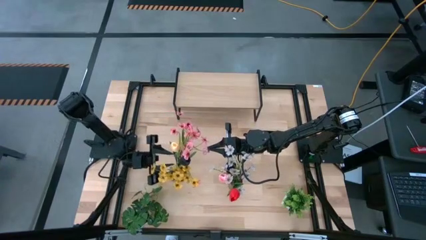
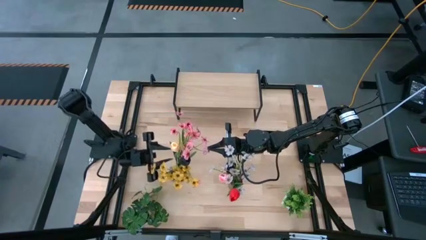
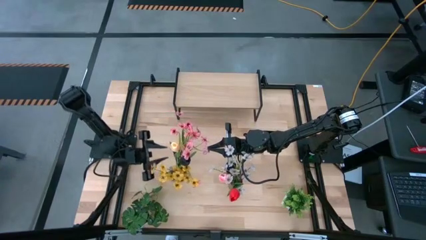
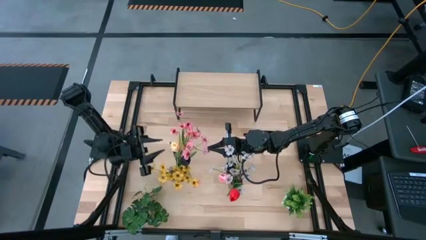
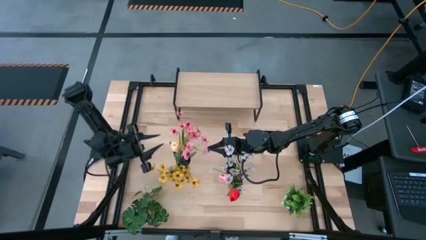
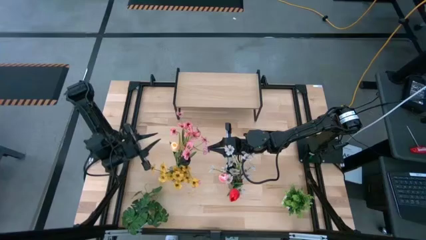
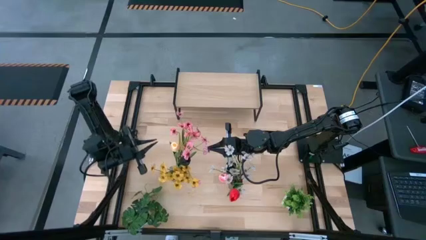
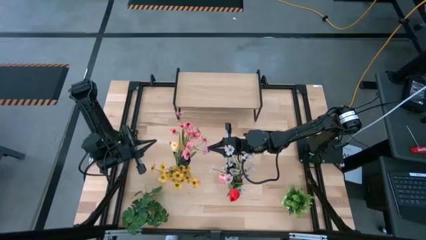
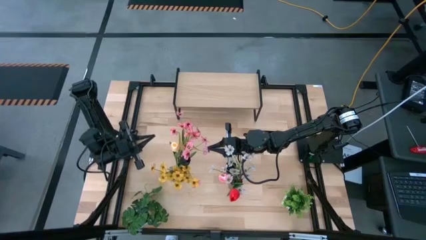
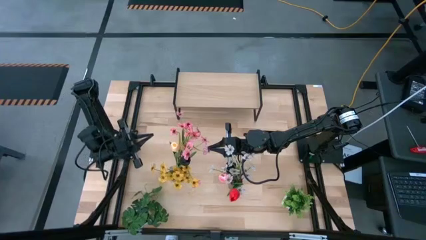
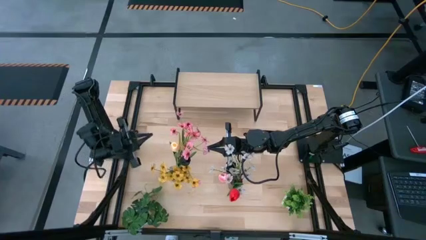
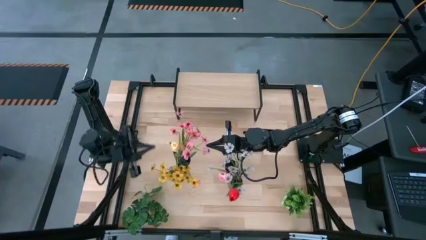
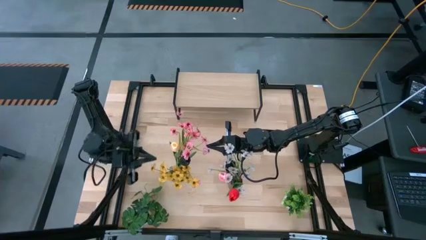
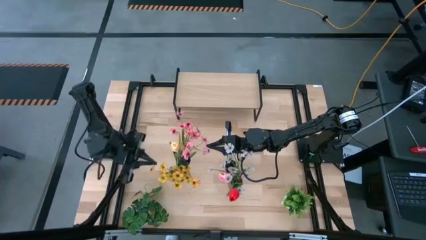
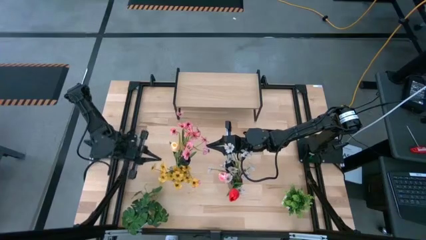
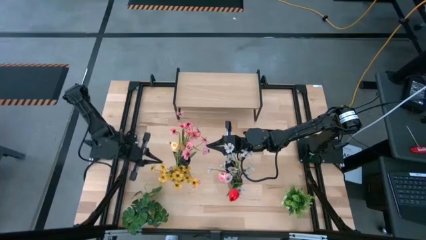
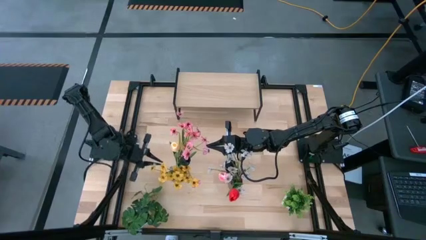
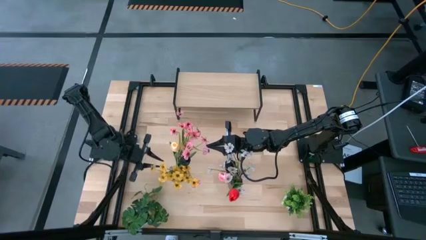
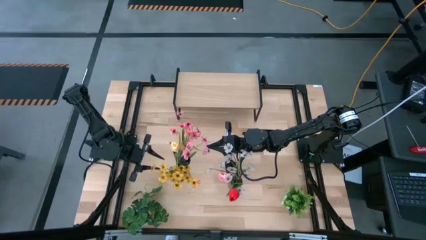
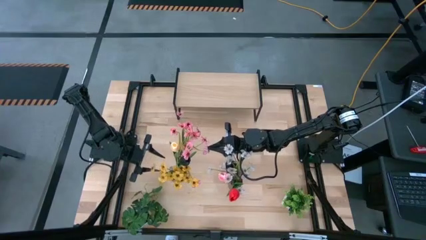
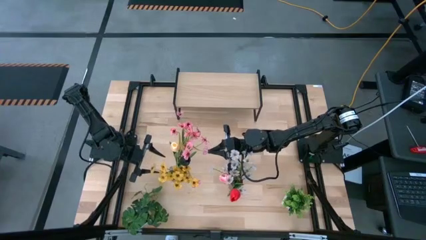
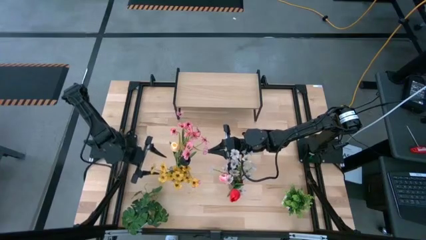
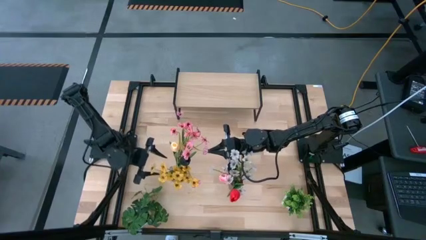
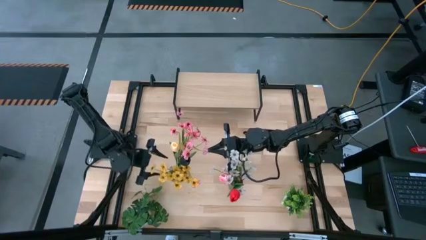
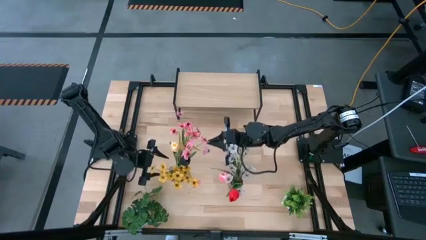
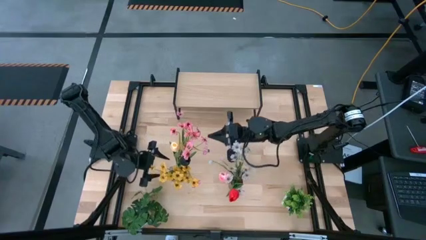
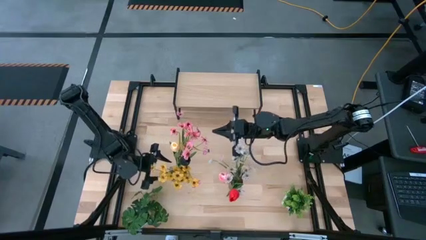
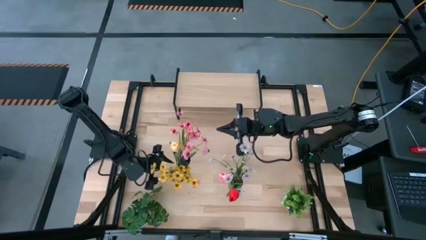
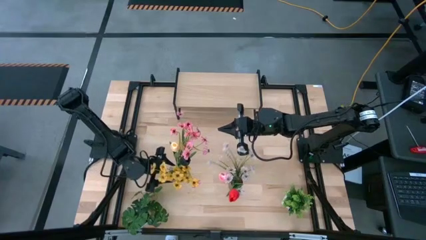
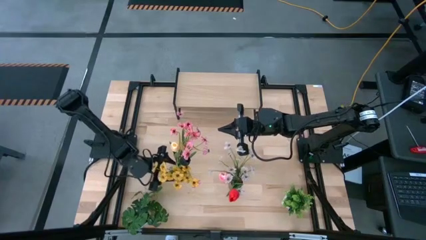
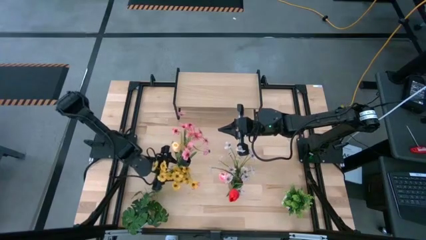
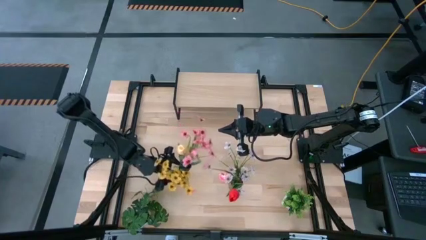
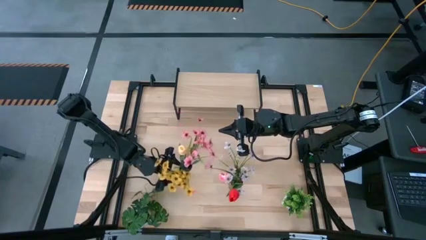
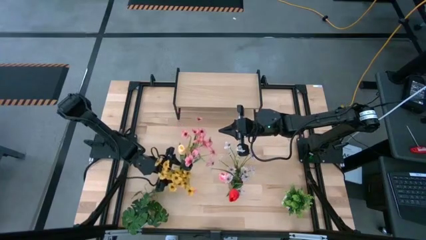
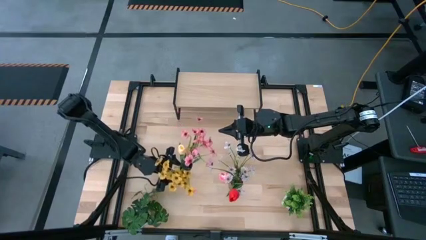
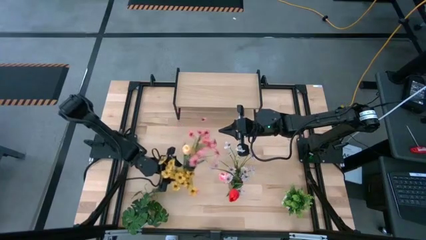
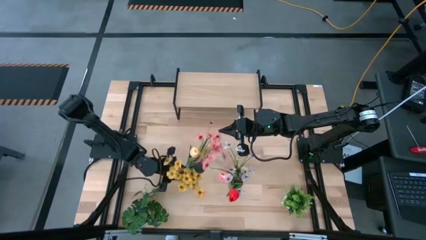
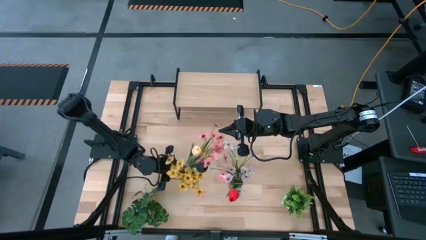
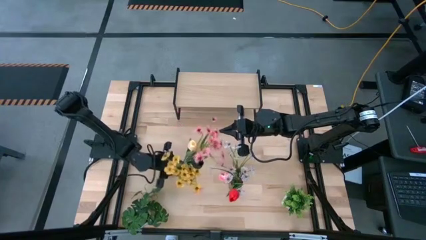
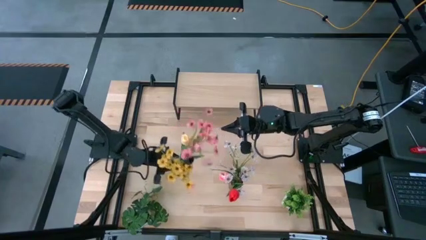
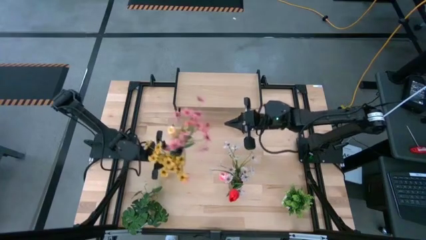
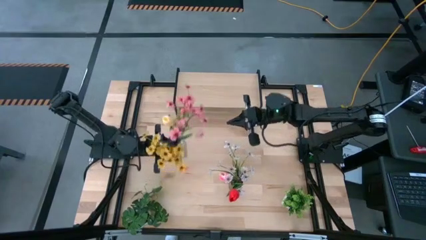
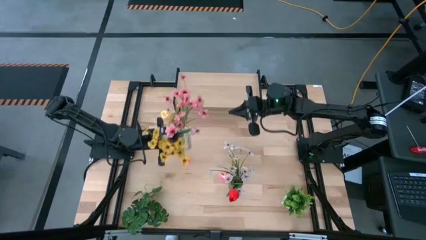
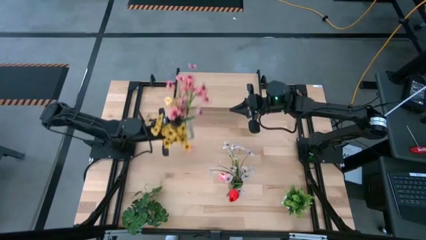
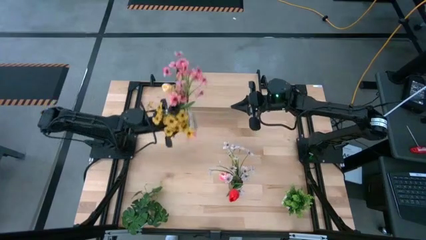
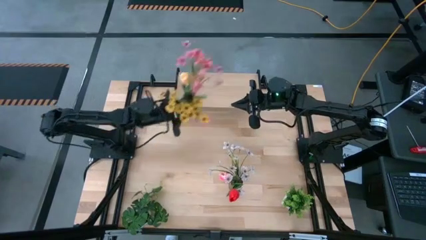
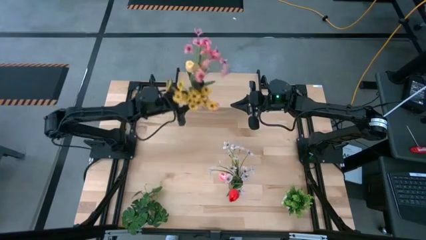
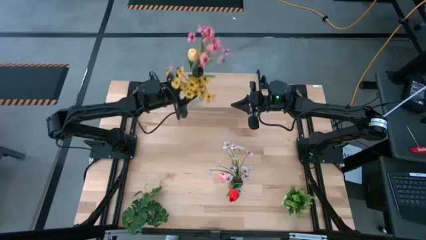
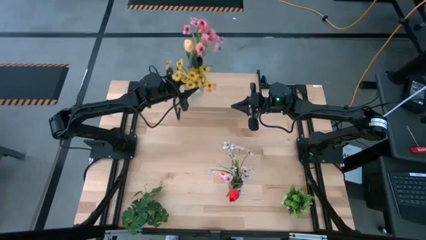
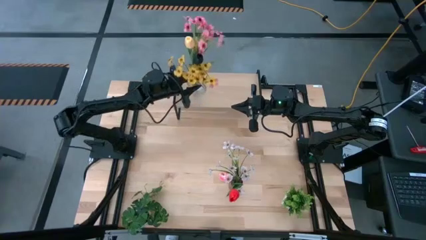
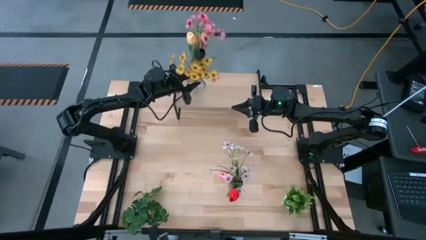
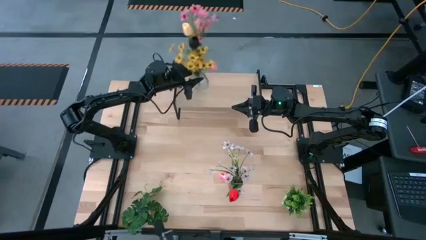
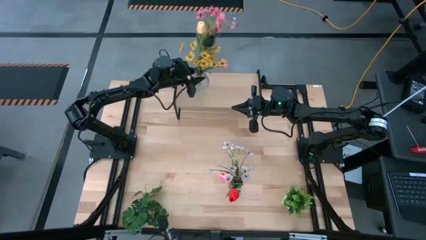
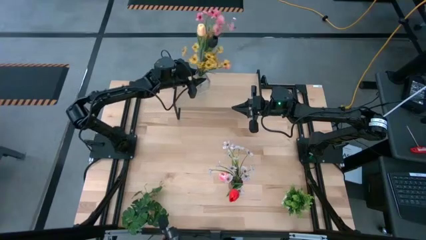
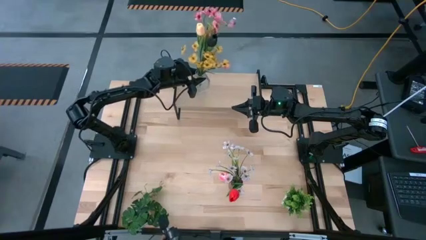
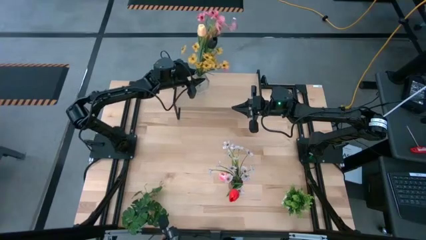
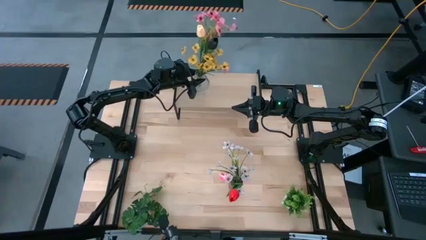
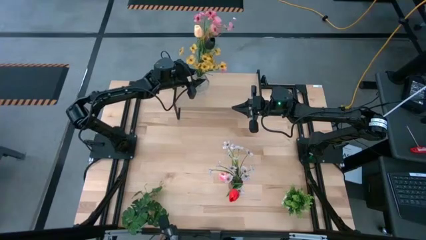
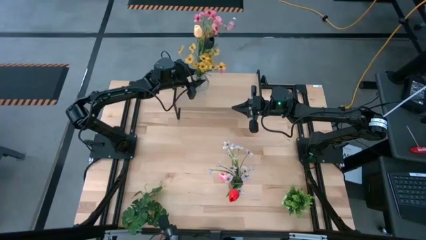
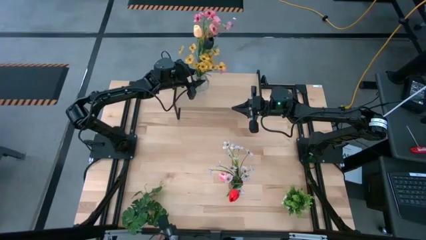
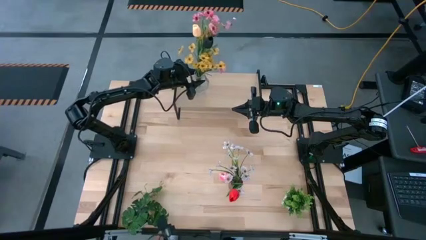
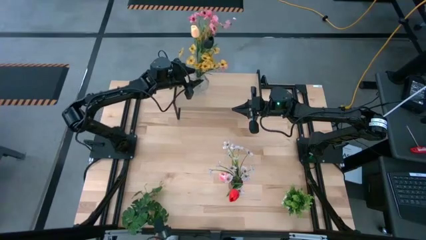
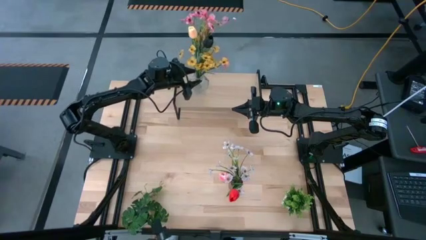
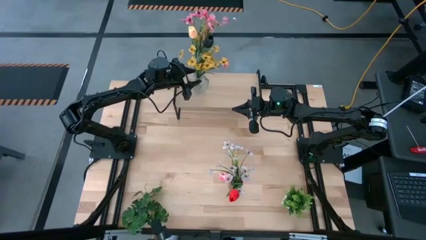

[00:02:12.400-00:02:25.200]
Task: Pick and place flowers into a vace then onto a shelf
Put the transparent vase with flowers on the shelf
